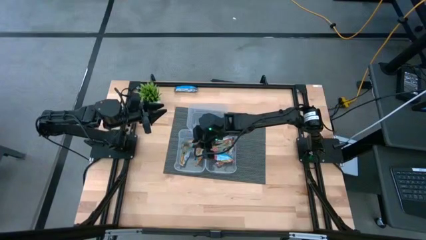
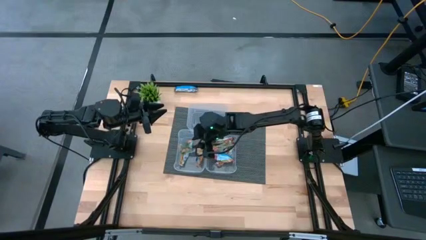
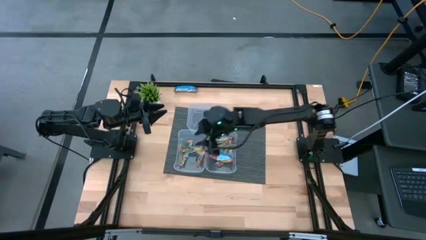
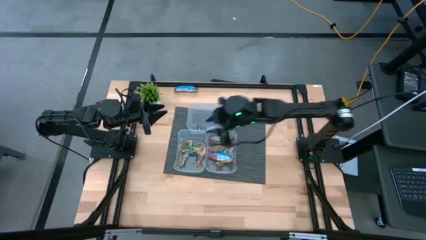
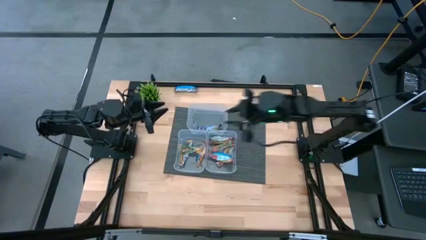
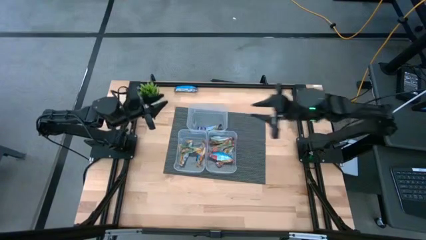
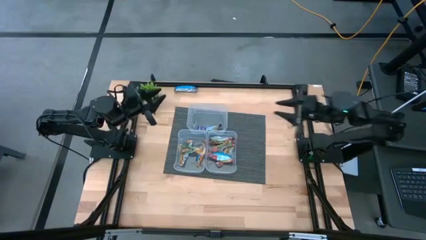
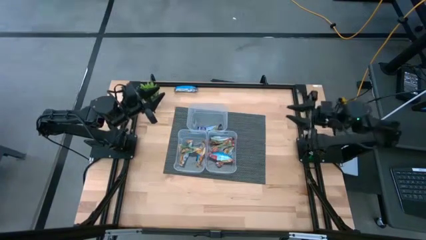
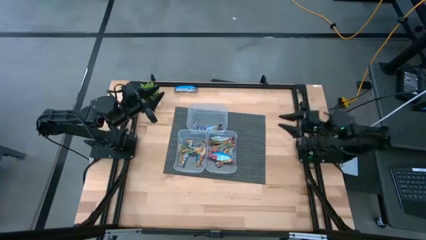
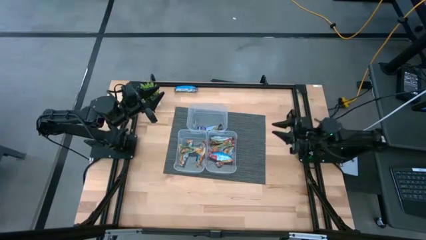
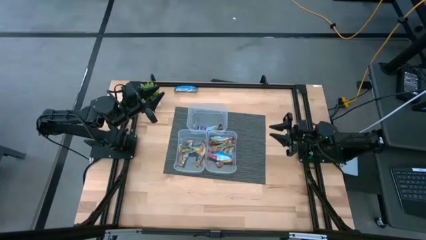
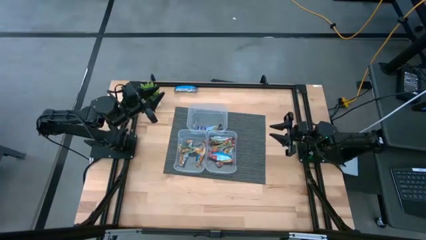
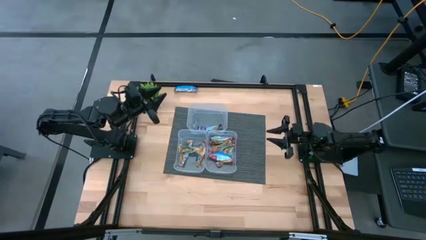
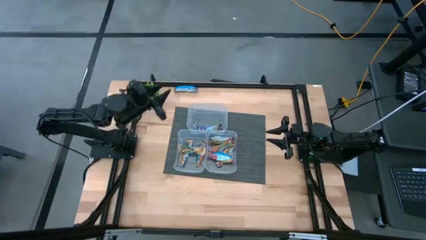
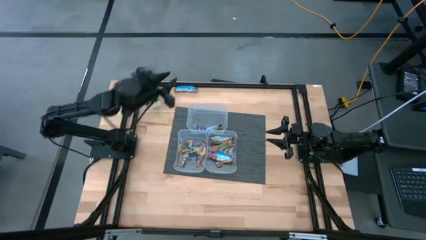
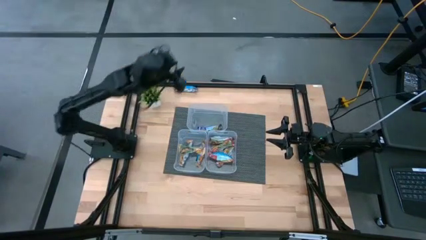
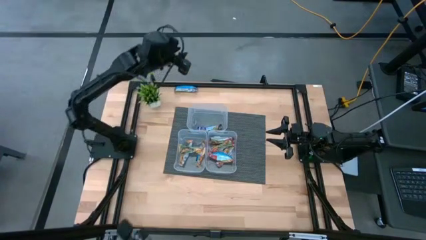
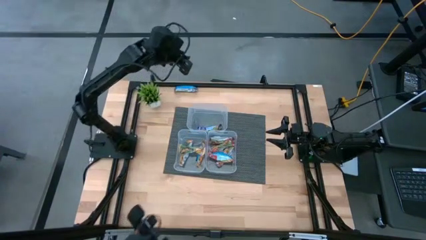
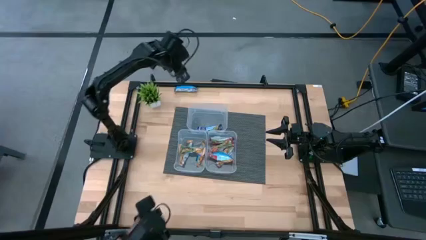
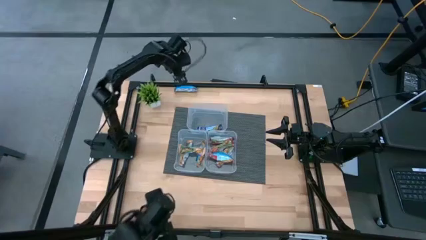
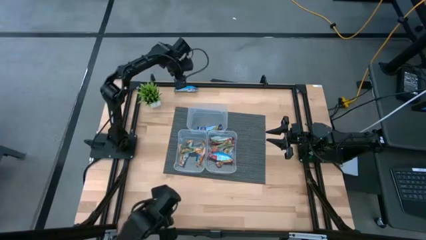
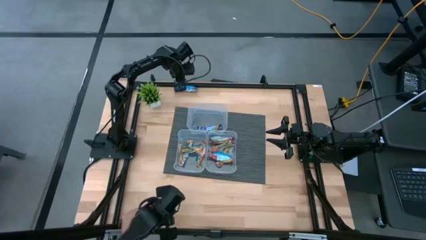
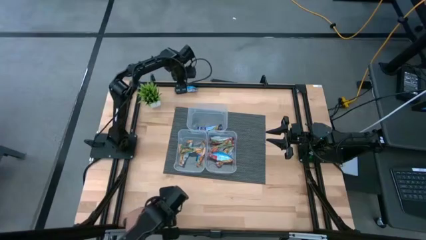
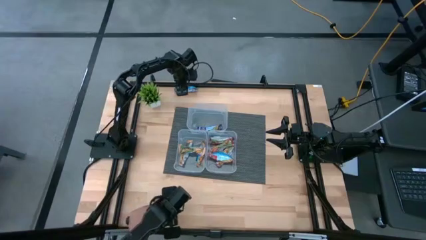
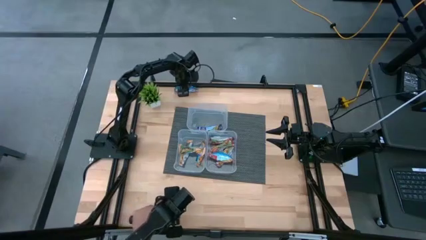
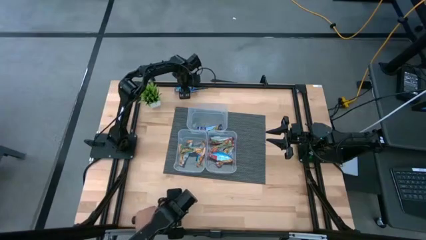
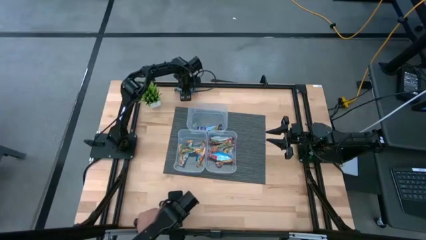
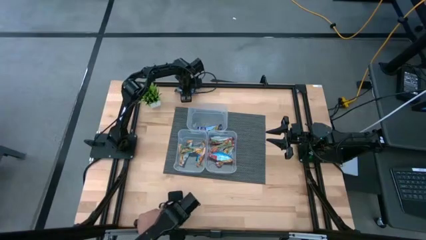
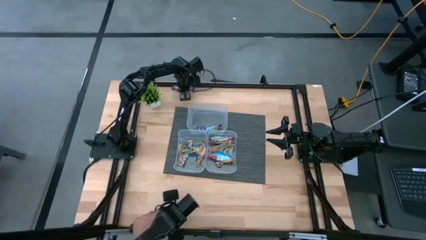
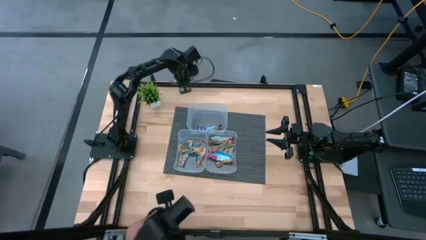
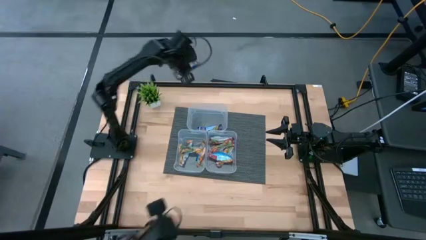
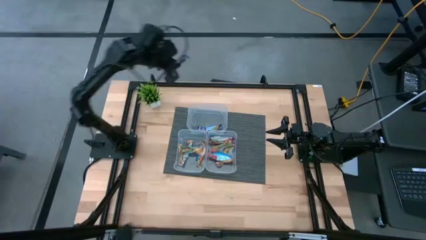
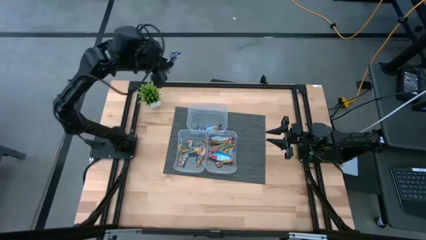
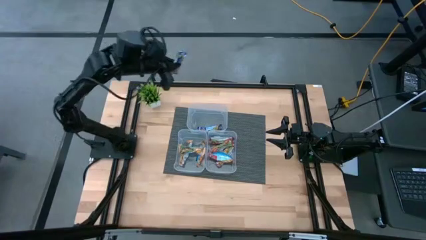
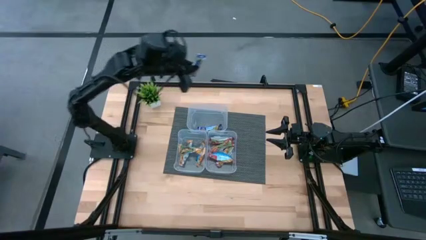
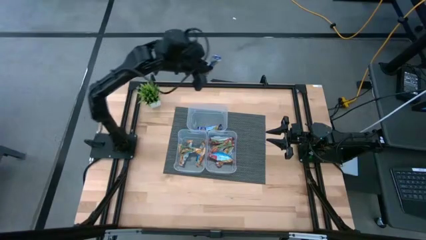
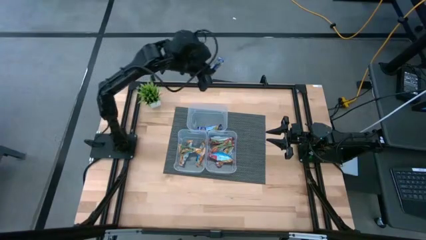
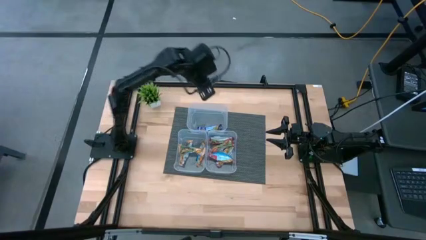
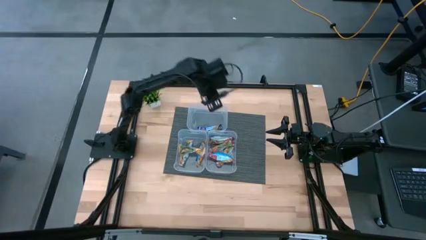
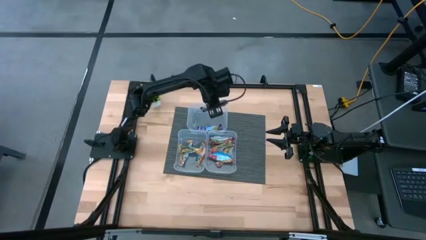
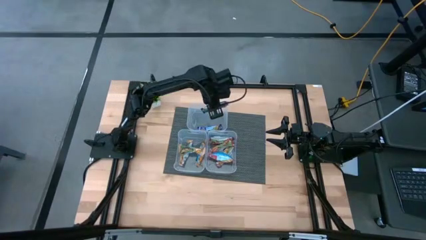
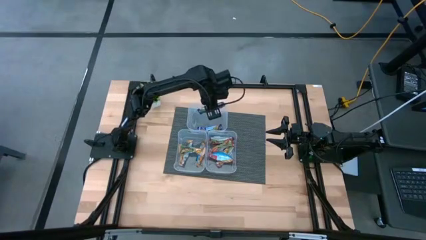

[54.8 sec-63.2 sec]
Task: Pick and place Granola Bars by type
Put the blue granola bar into the top transparent bin

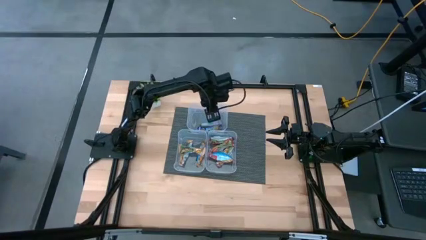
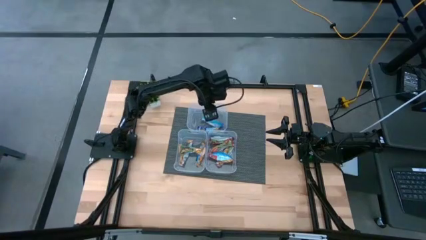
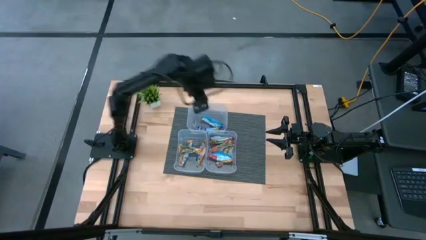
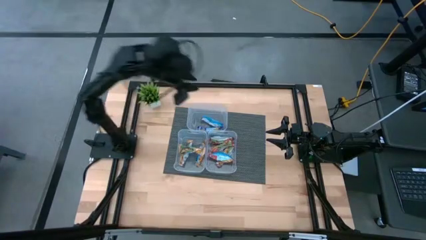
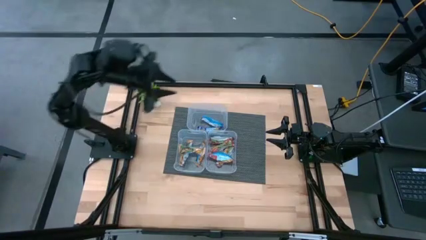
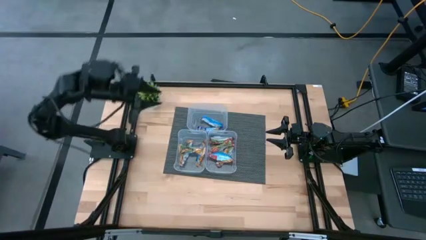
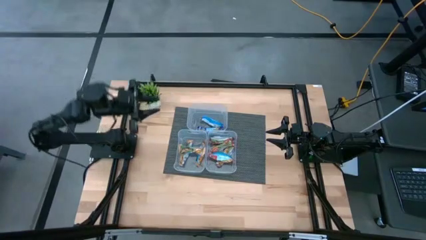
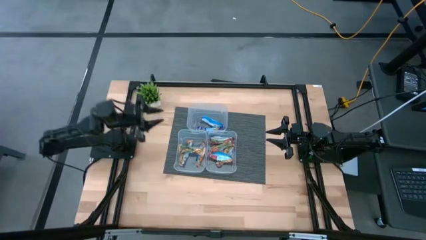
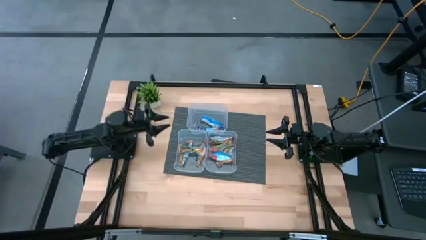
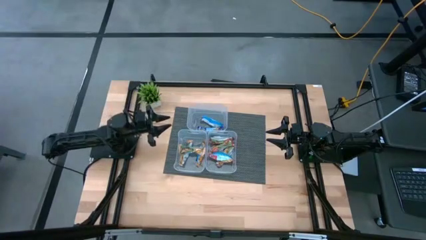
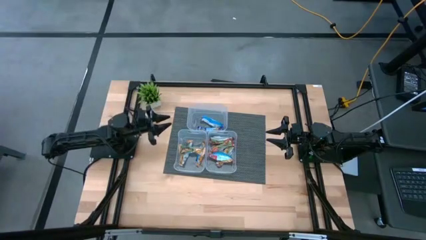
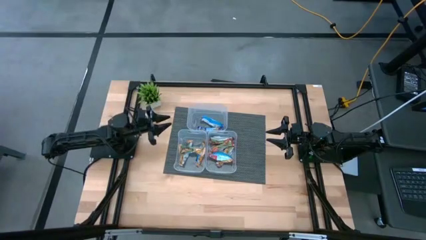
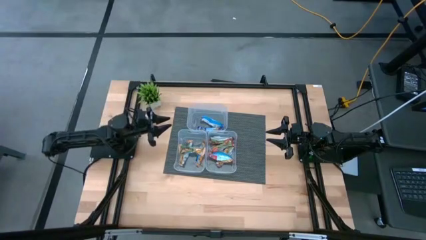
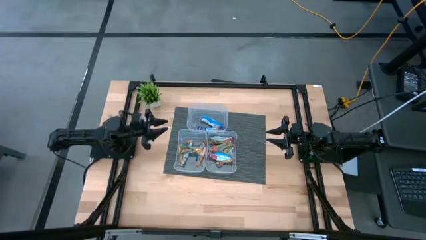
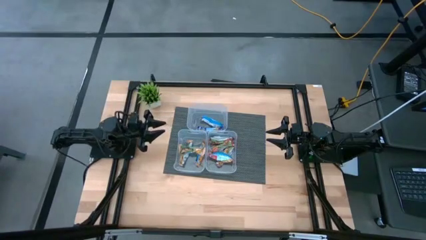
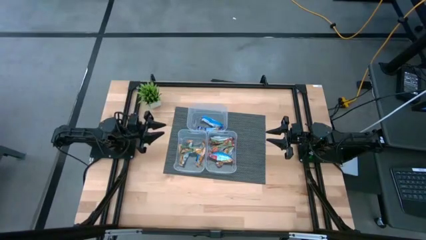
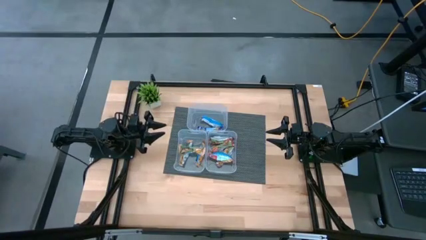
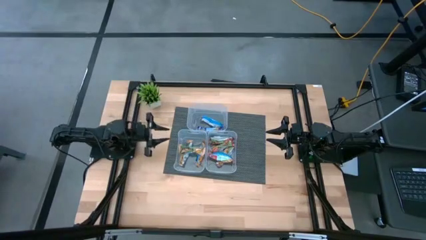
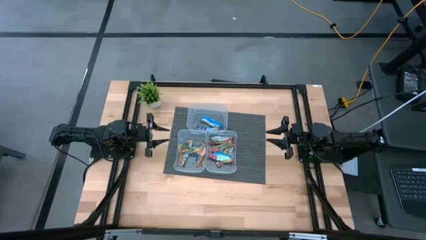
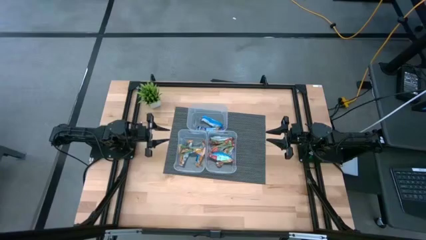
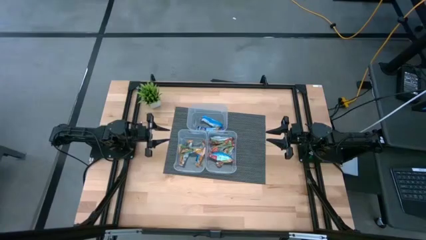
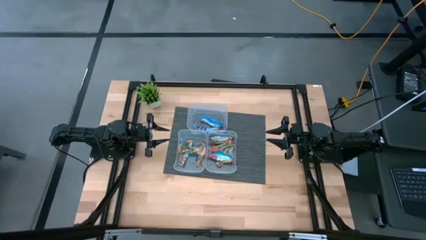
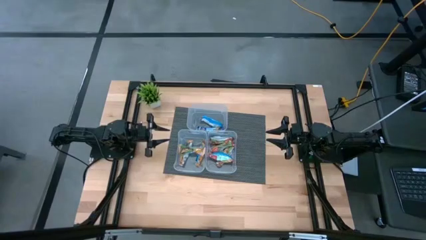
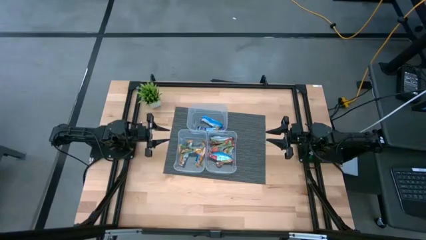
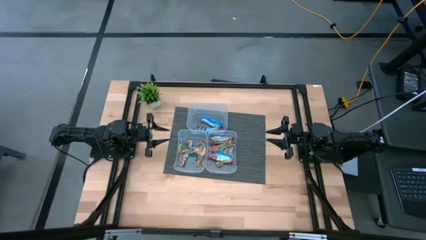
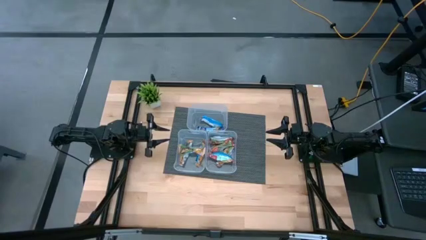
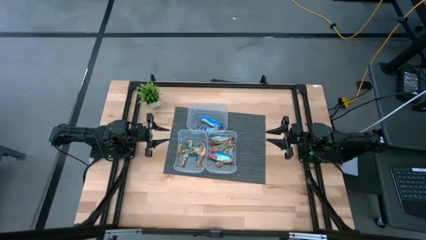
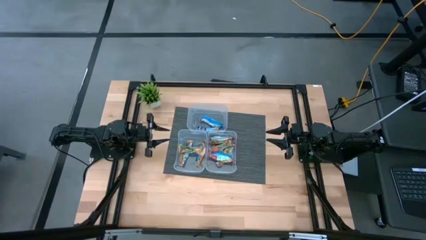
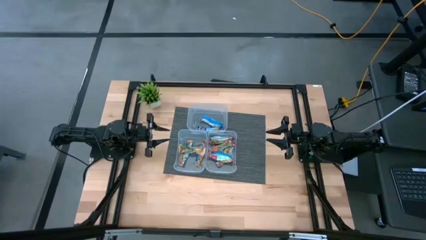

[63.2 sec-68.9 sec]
Return to Home Position

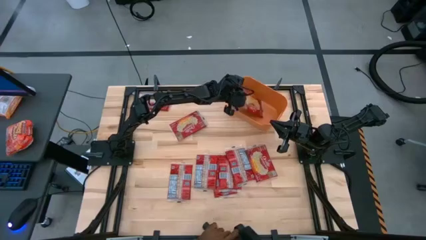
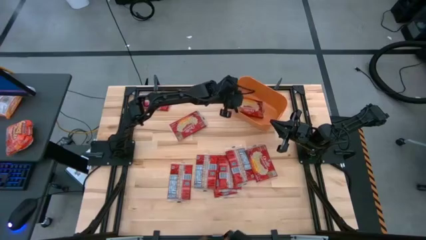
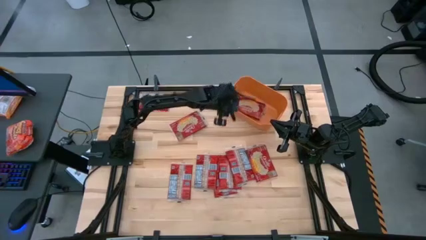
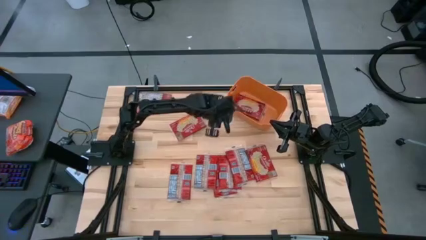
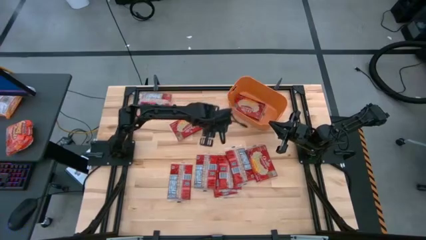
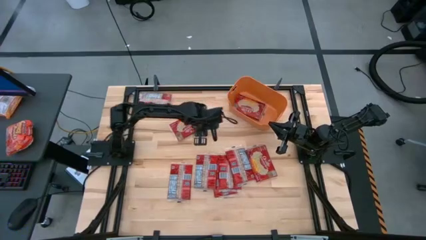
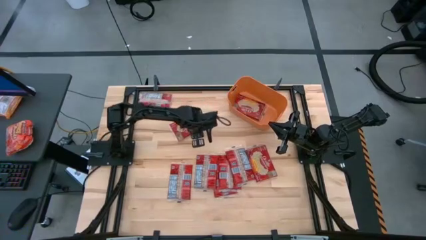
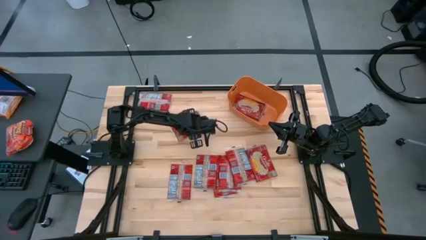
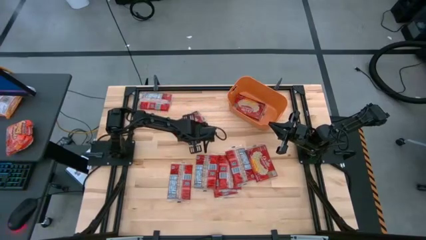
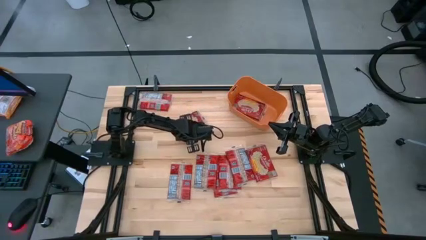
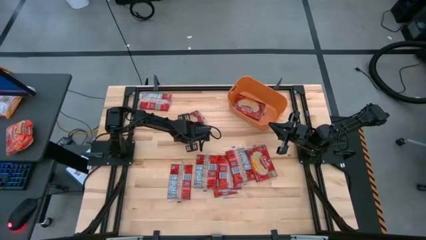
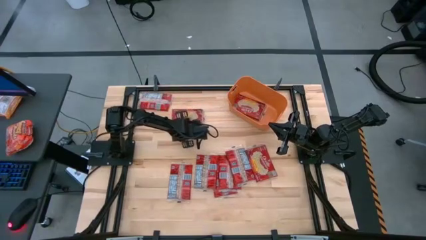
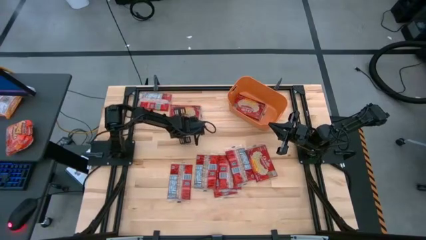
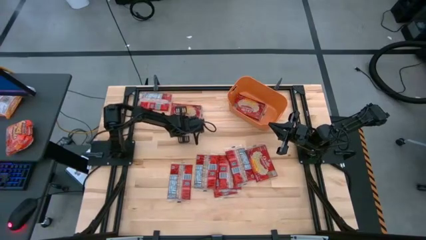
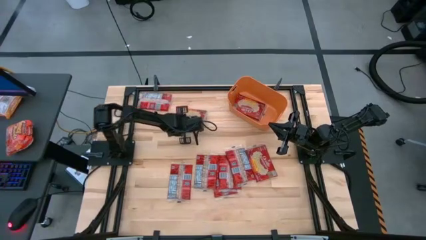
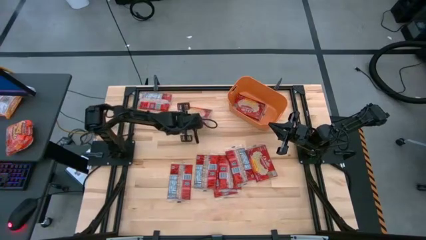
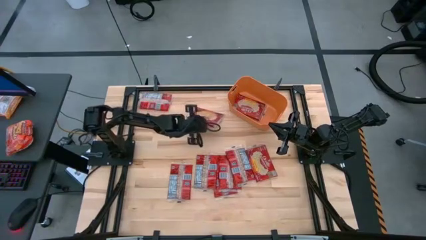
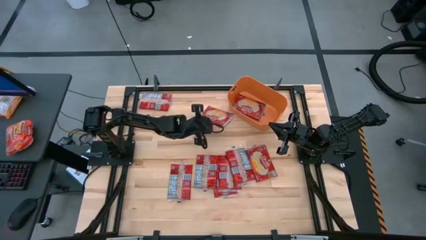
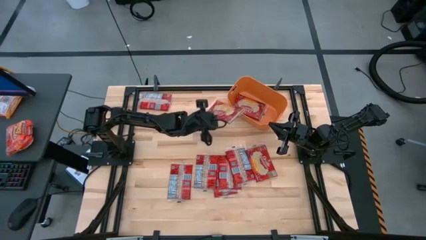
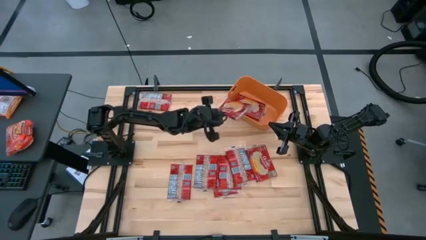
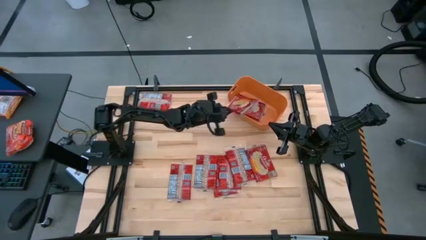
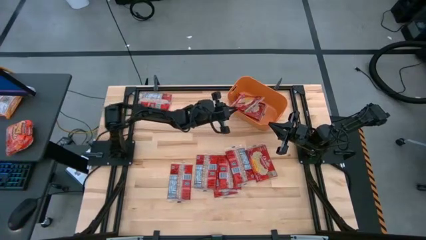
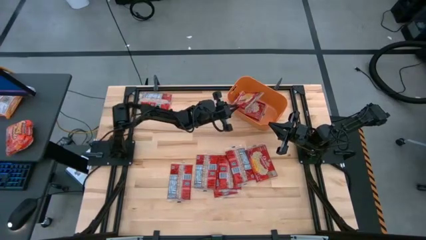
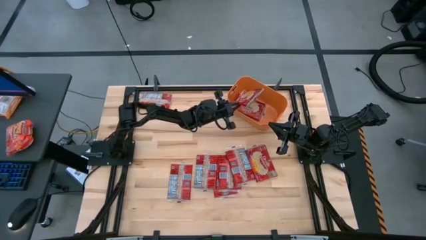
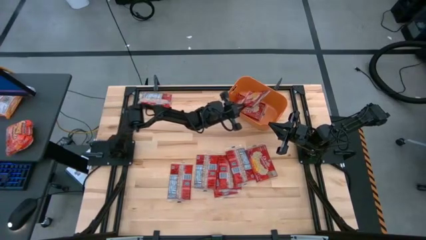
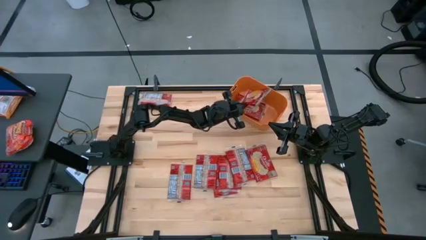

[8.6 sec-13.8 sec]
Task: Sort popcorn bags into baskets
Put the red popcorn bag into the orange bin
